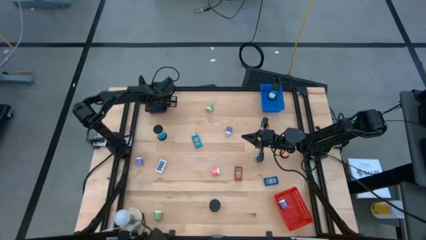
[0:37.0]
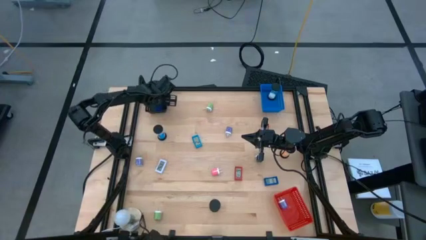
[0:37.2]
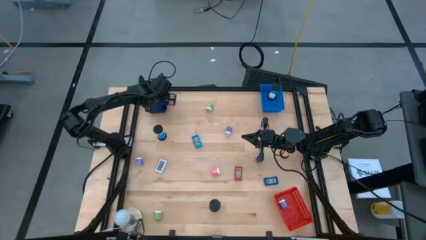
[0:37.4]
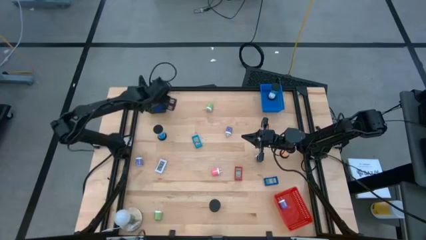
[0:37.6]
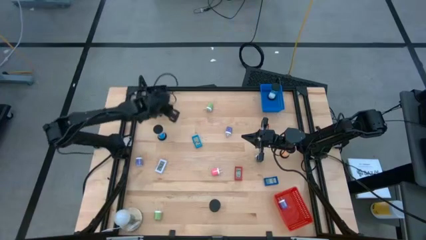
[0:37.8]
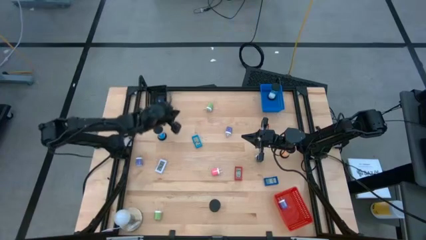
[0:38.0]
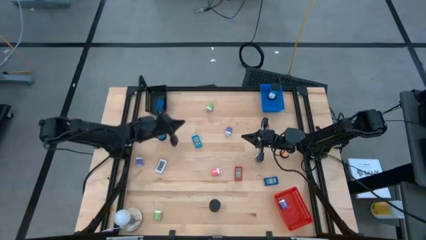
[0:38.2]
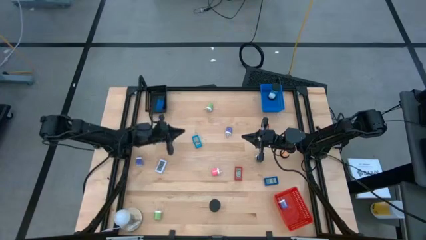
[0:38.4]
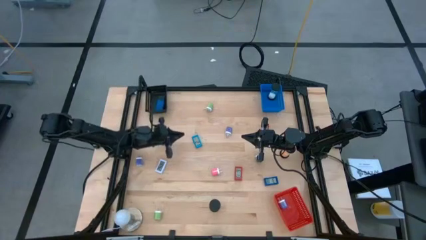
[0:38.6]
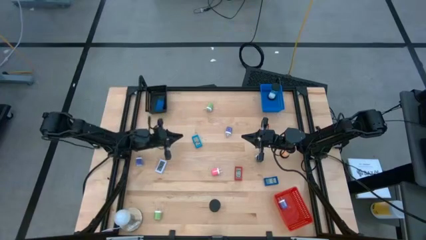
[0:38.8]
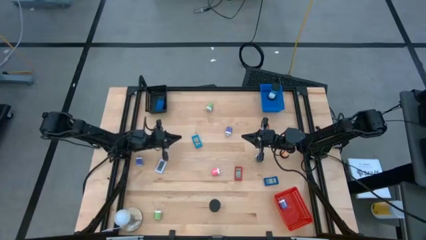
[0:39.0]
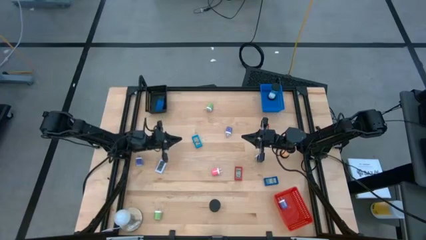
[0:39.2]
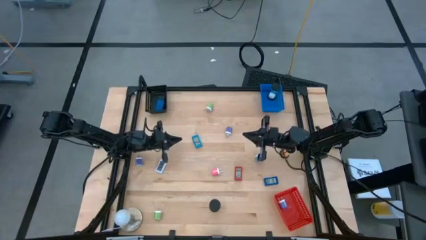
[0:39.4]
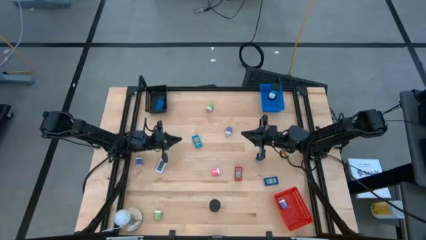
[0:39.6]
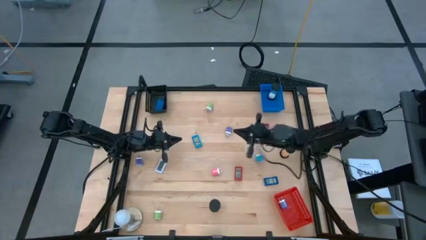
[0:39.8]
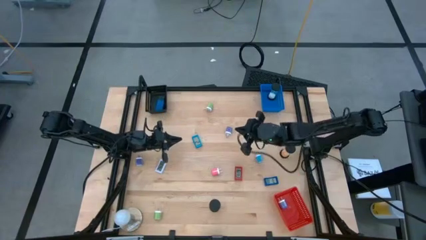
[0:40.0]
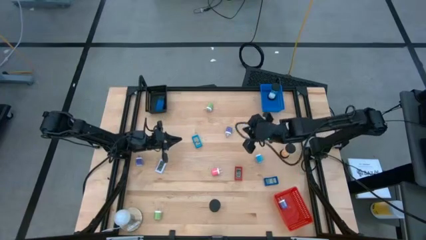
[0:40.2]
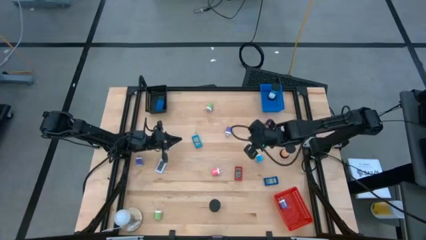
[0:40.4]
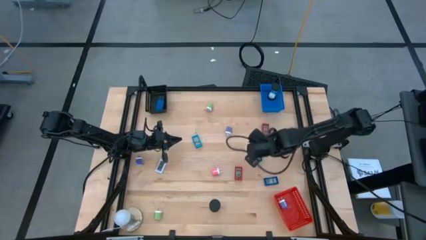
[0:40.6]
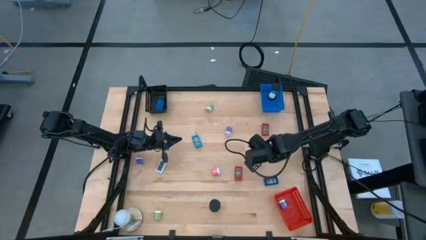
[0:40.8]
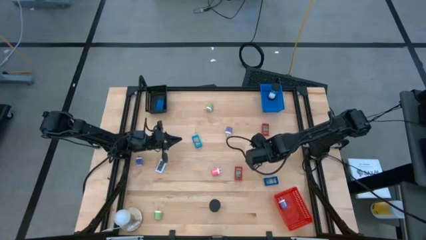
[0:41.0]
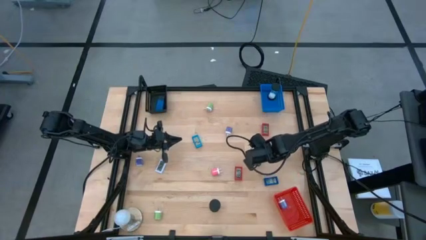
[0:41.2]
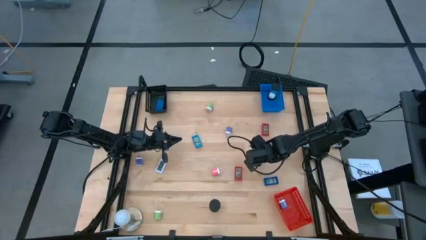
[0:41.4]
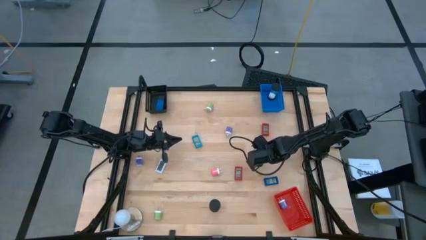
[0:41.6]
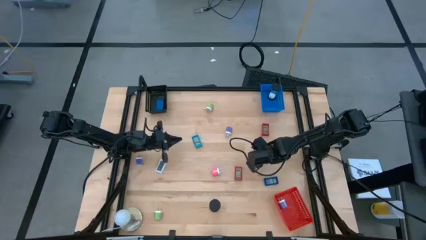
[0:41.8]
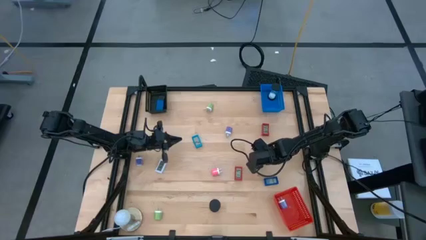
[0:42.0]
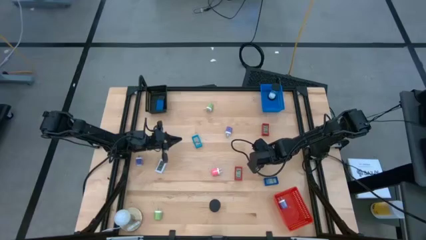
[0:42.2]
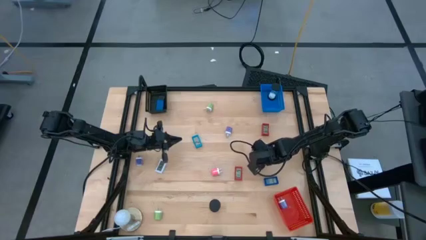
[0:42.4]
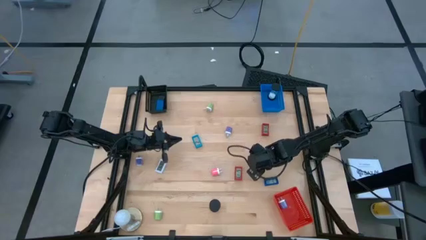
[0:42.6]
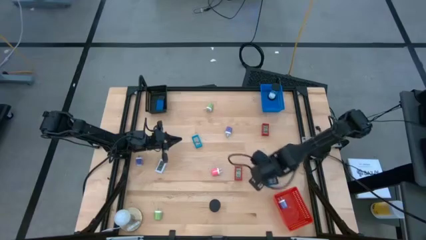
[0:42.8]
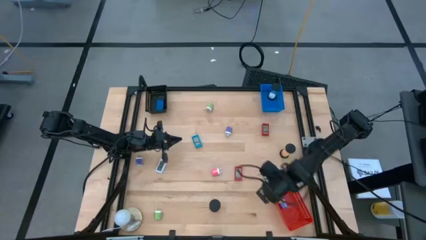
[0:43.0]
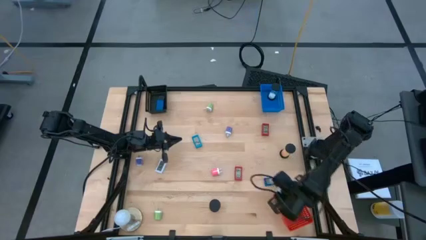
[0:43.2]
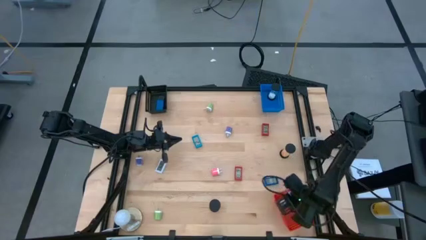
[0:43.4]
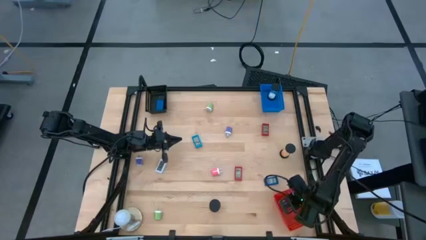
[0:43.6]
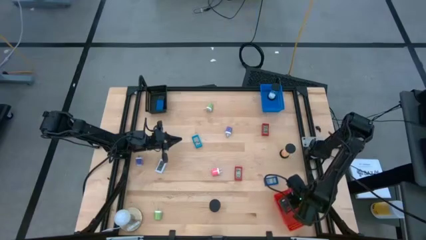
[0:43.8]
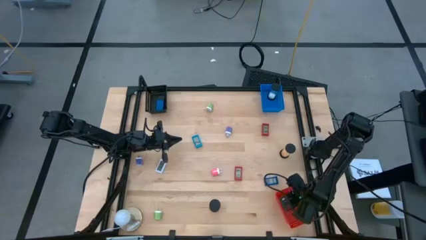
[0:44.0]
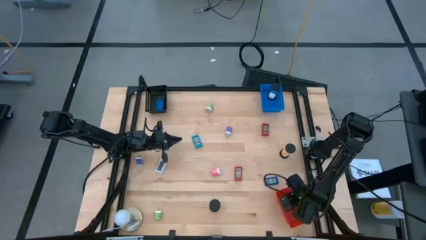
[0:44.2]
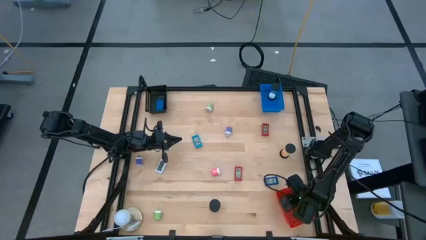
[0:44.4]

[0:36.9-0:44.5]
Task: Pick & Place Office items
Put the light blue charger adapter into the red basket

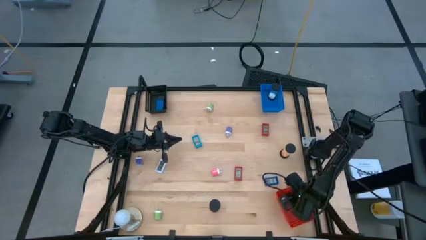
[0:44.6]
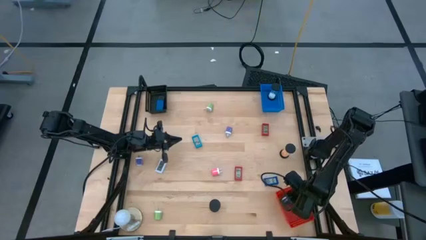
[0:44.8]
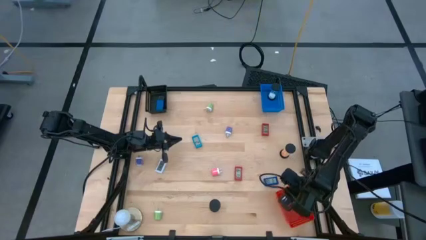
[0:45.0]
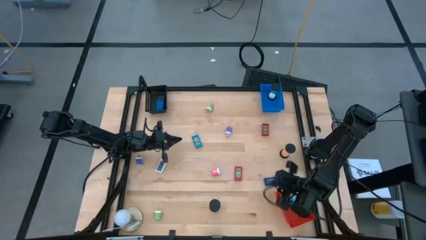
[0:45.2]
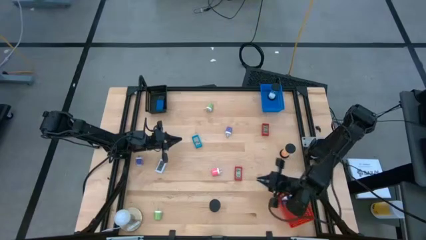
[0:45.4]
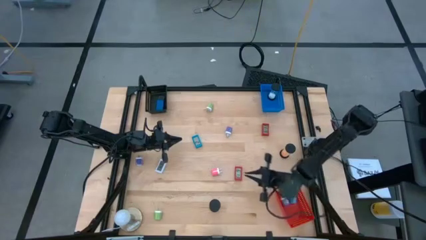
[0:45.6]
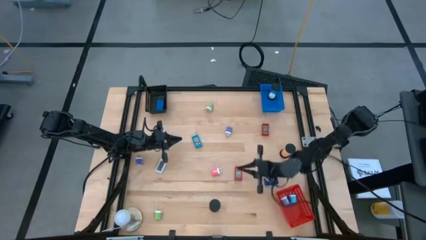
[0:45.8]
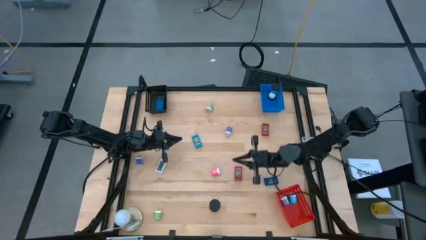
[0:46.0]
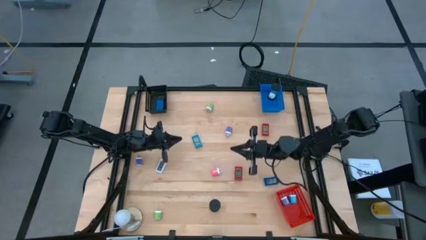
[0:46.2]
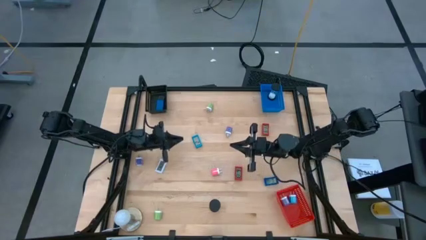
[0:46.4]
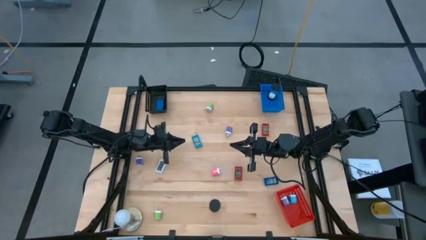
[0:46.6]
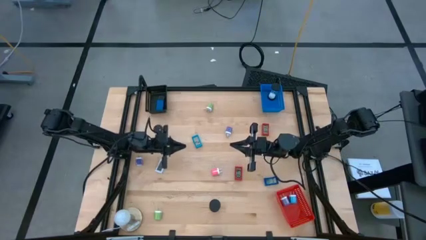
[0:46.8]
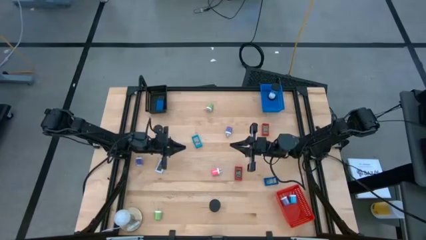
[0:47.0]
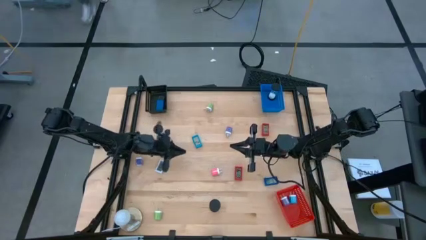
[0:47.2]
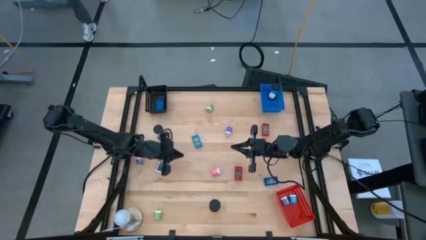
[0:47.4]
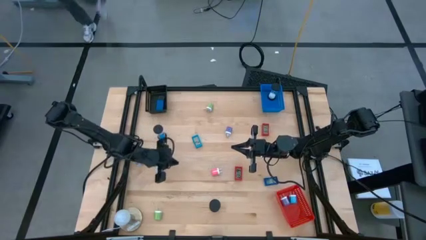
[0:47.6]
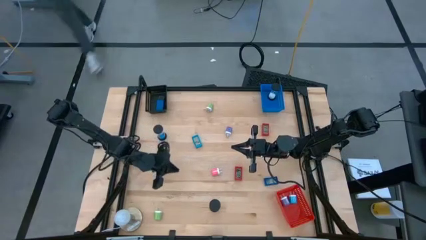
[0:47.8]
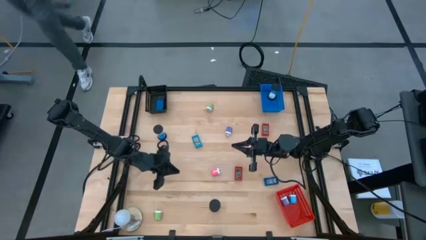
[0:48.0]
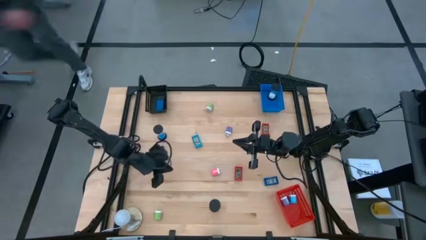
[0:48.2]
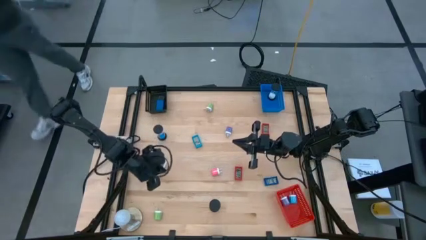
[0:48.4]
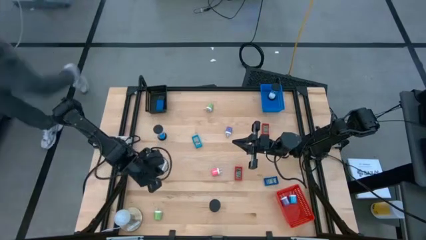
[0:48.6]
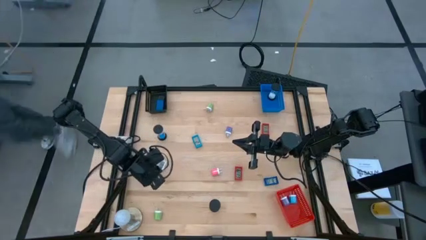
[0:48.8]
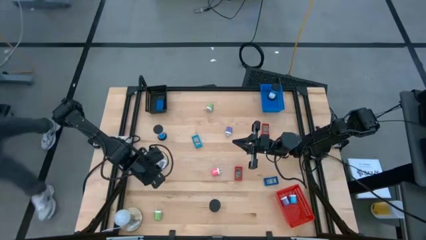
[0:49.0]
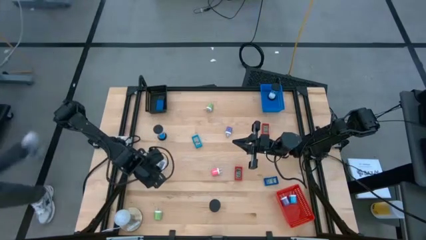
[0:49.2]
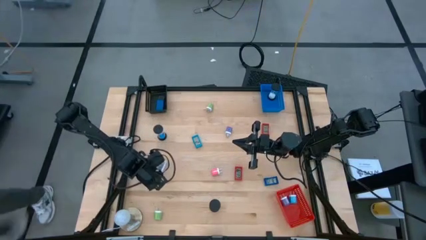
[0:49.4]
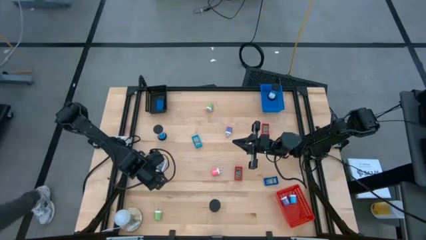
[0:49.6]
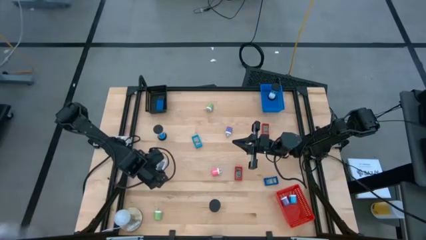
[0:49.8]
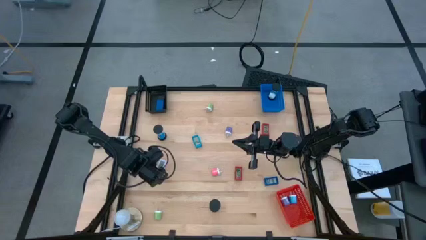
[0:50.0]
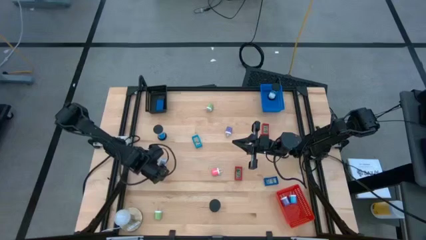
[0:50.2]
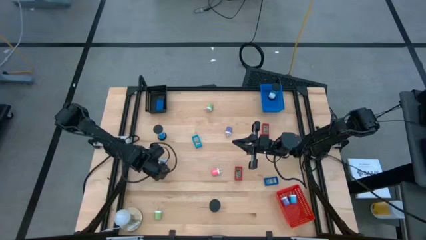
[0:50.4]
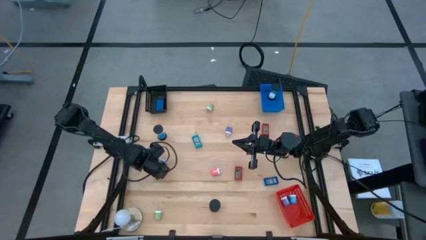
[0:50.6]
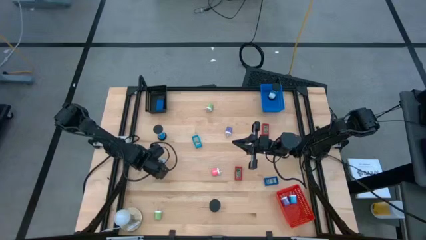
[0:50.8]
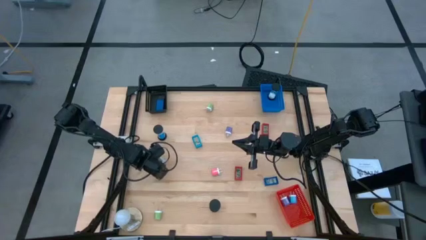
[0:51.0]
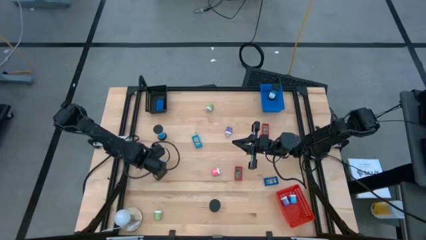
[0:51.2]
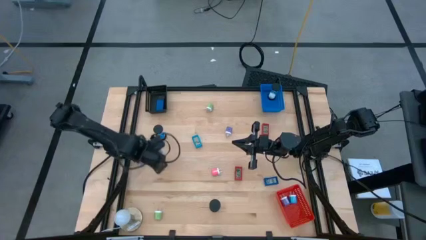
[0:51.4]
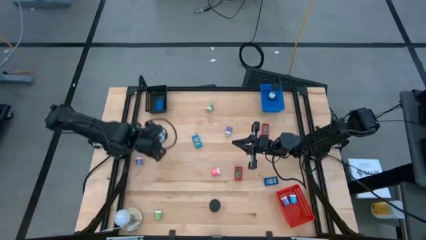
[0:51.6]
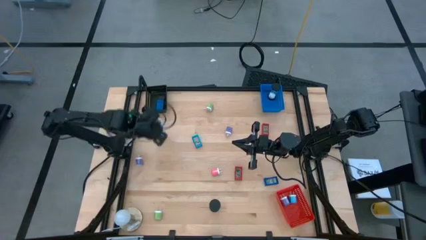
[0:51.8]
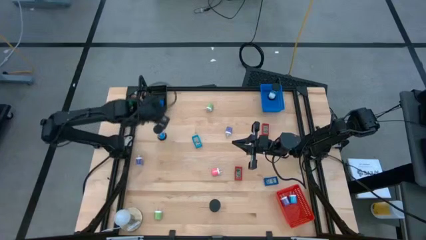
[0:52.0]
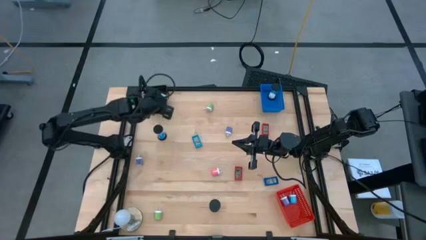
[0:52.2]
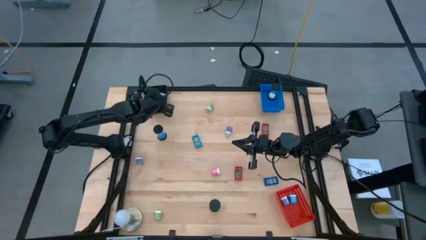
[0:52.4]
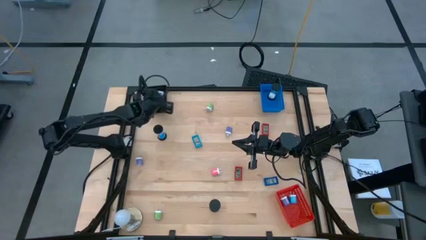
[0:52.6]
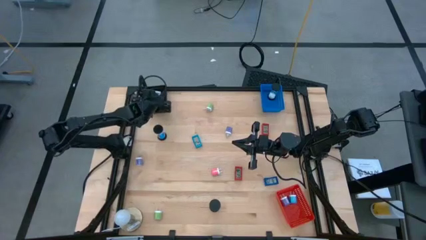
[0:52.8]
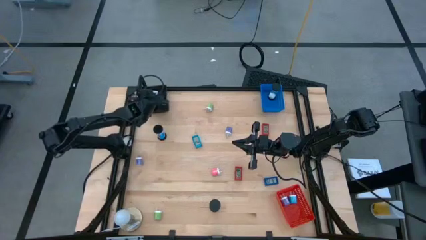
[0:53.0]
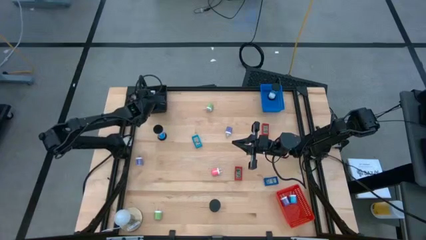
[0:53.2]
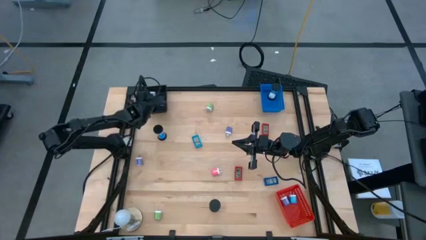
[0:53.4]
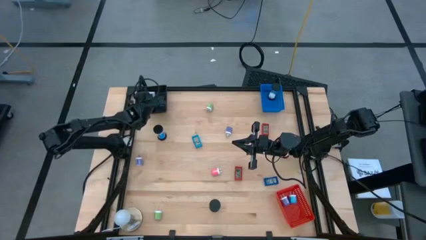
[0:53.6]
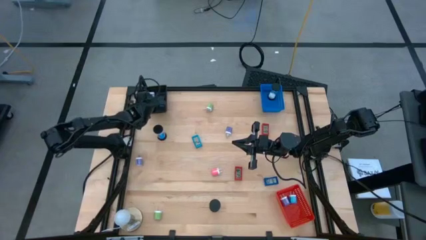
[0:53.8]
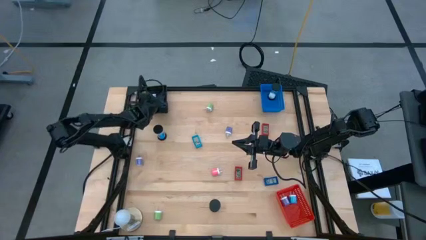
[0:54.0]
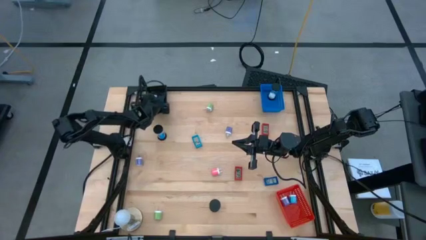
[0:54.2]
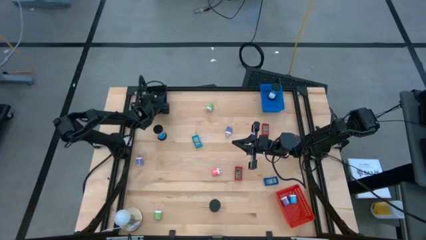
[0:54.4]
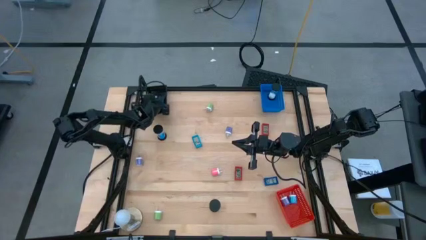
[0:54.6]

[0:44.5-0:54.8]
Put the white digital timer into the black basket
